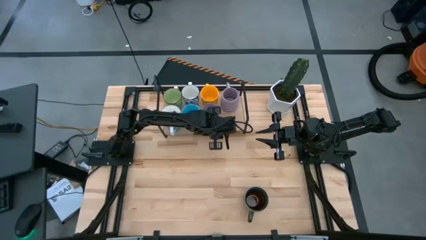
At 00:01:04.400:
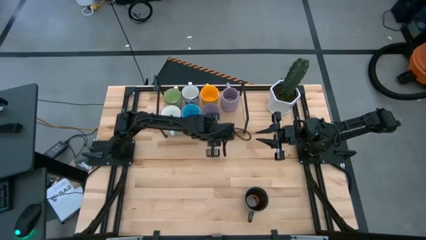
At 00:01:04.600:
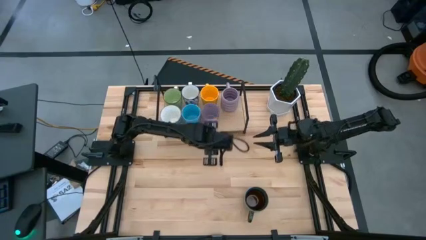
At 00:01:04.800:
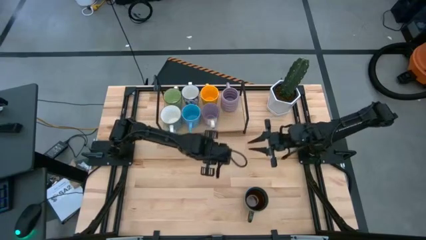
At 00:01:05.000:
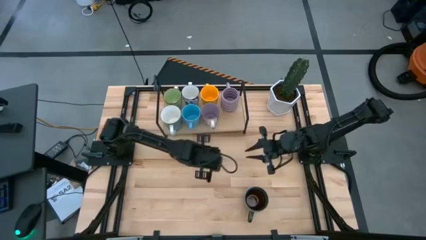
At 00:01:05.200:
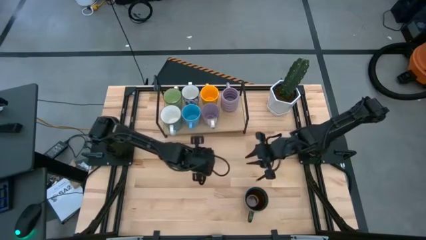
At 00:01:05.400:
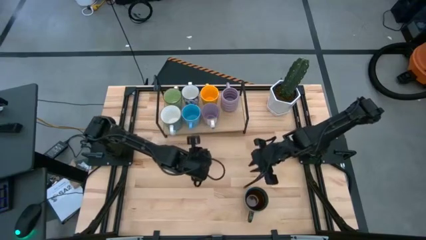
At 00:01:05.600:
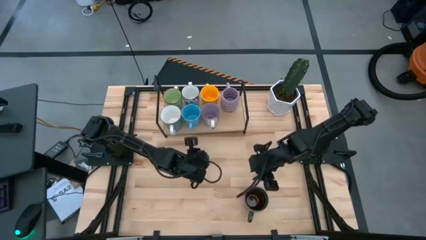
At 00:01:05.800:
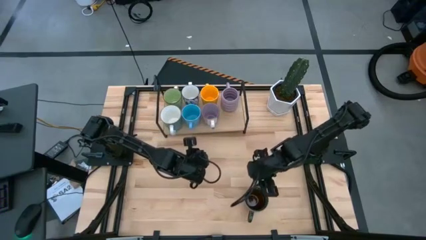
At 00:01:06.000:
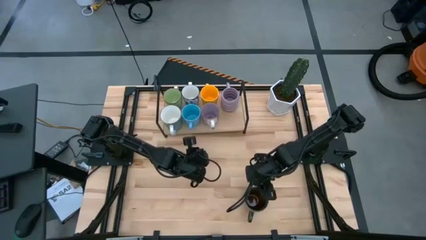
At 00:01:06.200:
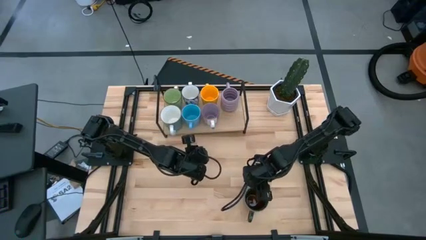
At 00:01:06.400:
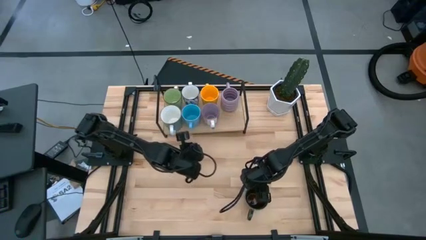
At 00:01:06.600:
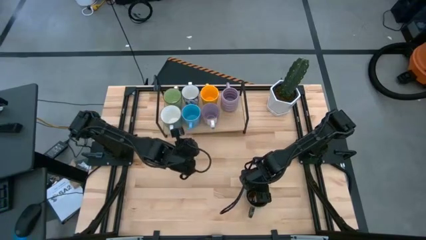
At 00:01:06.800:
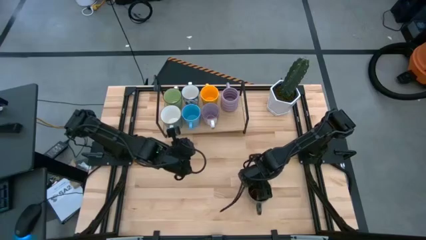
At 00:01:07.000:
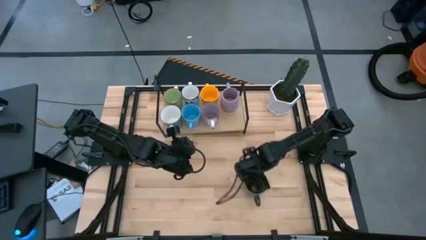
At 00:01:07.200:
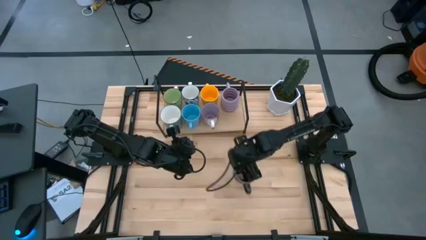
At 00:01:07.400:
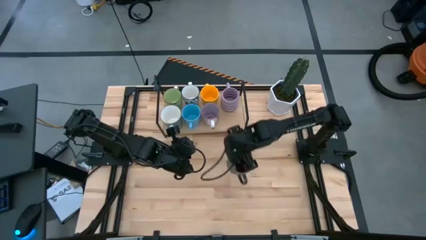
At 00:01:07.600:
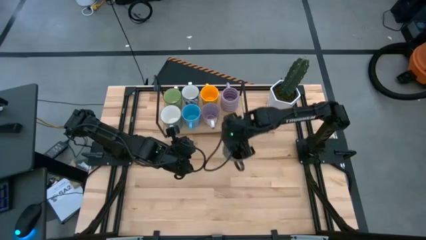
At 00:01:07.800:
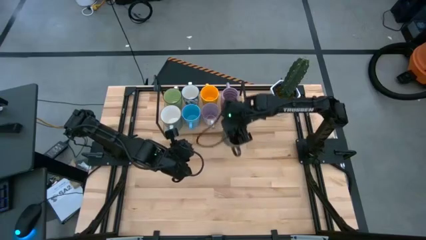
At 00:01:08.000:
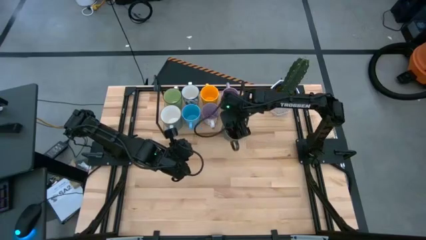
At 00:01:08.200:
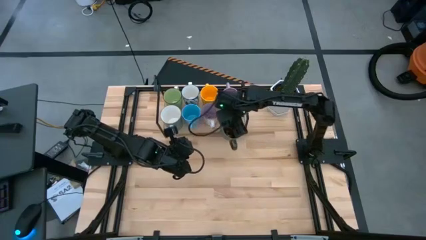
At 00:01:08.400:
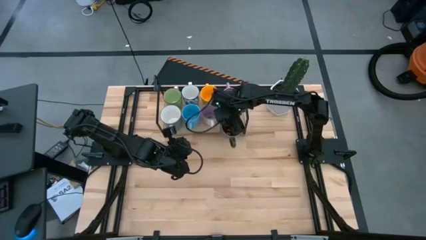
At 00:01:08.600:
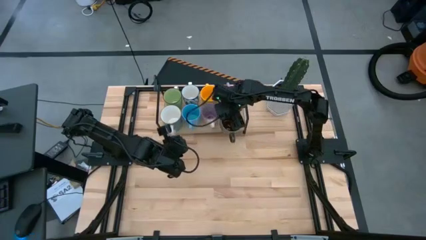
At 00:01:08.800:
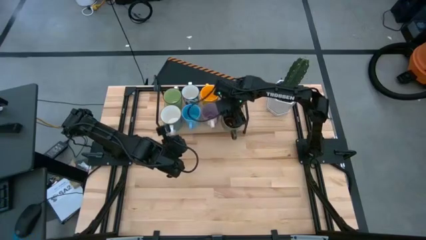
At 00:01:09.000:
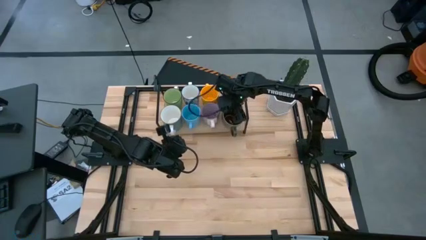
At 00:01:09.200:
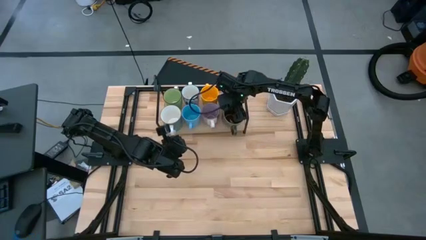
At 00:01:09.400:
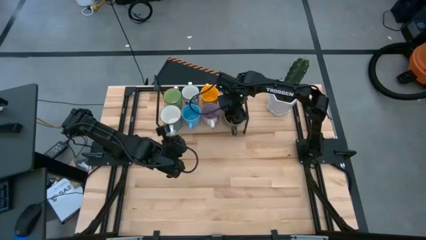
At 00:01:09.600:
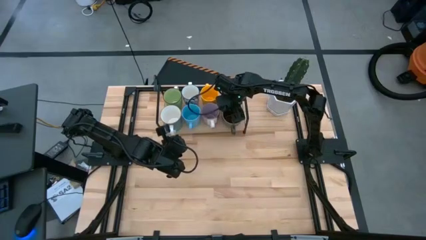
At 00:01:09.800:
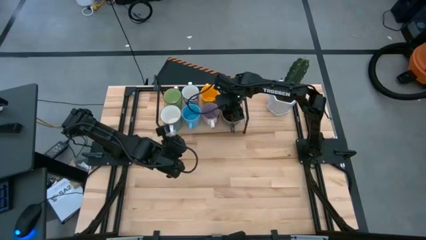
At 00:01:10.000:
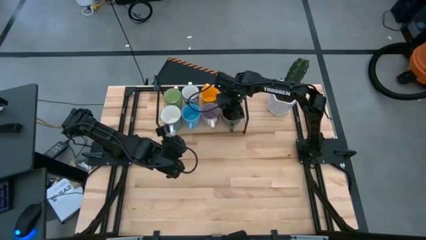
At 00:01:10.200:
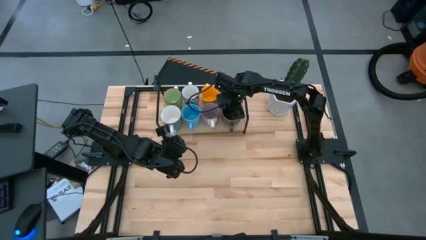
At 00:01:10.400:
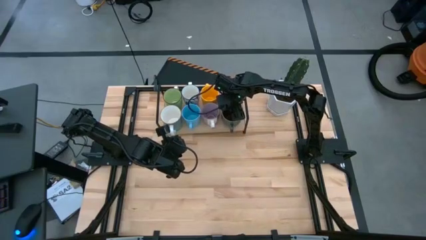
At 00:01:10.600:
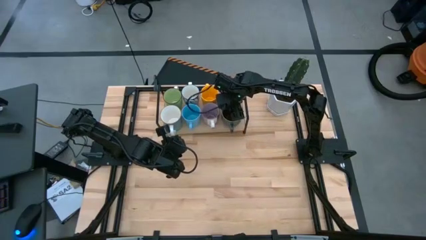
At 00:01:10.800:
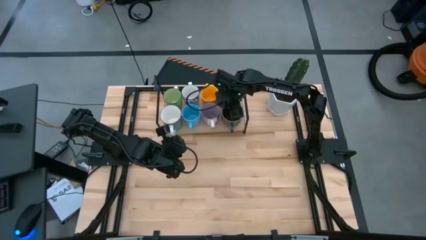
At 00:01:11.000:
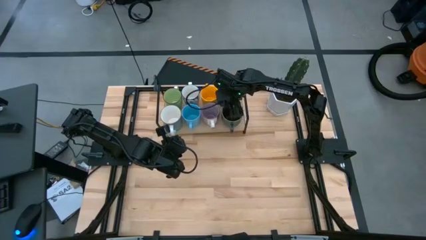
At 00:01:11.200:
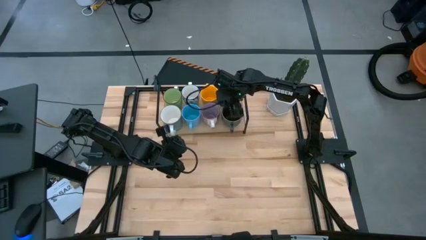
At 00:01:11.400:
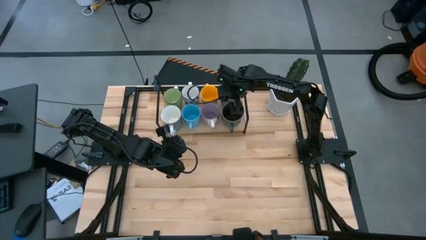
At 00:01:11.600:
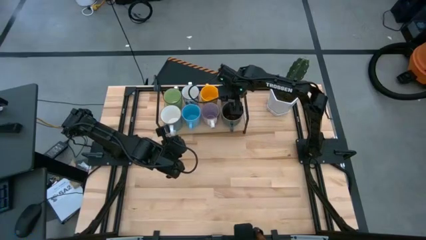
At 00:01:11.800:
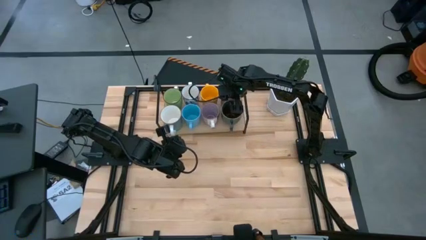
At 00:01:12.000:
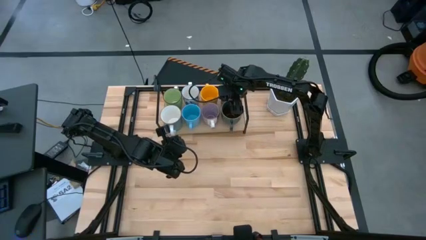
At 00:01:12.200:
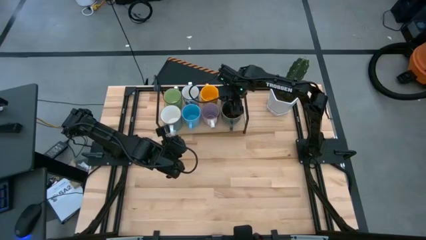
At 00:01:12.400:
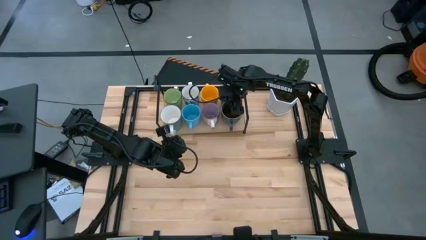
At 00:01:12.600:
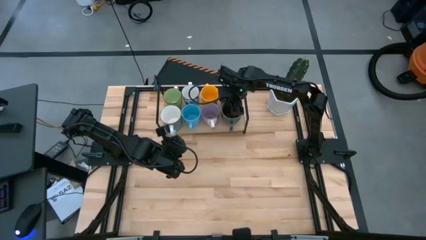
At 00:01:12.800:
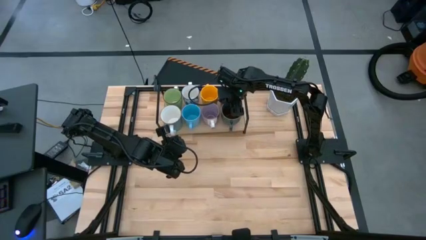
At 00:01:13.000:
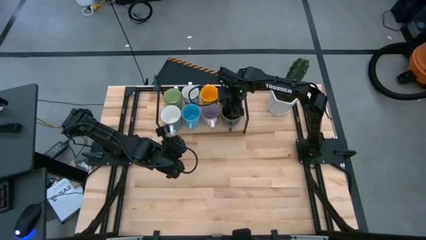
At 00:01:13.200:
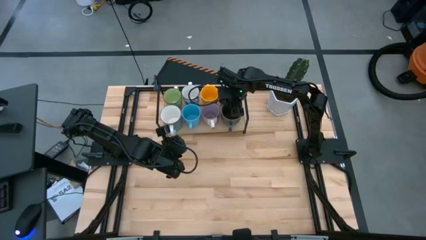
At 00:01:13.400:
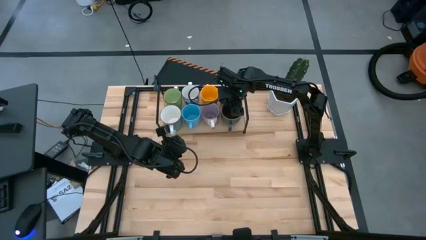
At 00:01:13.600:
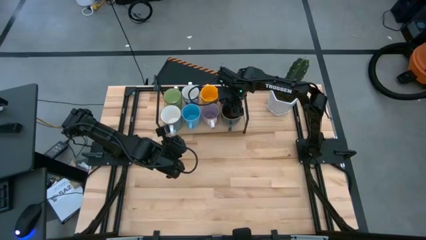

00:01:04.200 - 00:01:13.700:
Task: Place coffee mugs
Put the brown patterned mug on the shelf

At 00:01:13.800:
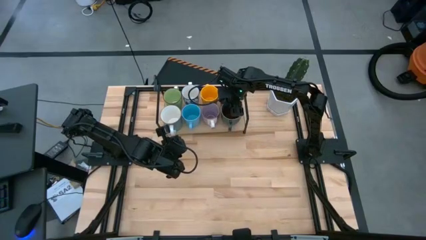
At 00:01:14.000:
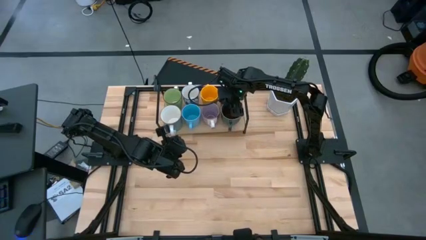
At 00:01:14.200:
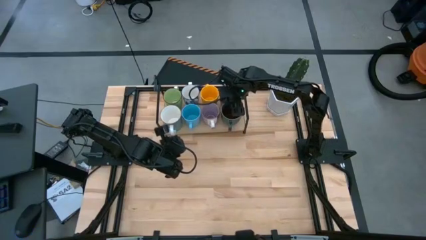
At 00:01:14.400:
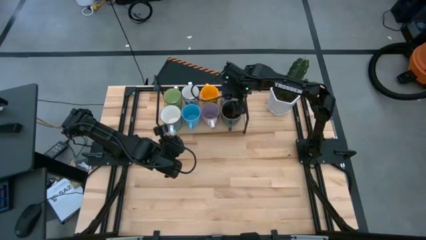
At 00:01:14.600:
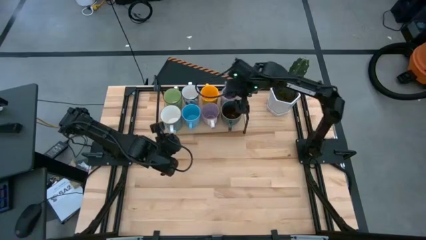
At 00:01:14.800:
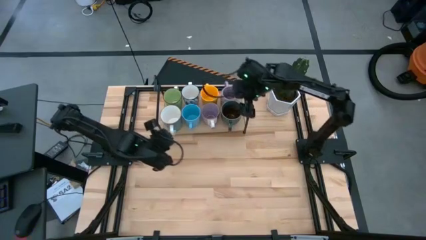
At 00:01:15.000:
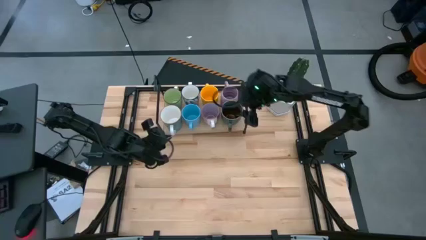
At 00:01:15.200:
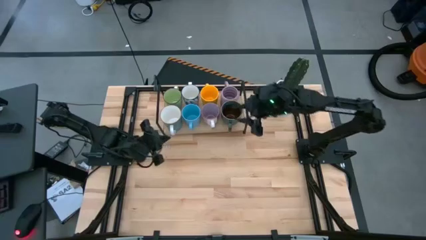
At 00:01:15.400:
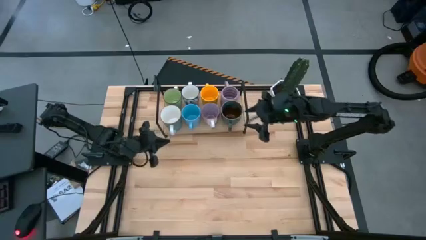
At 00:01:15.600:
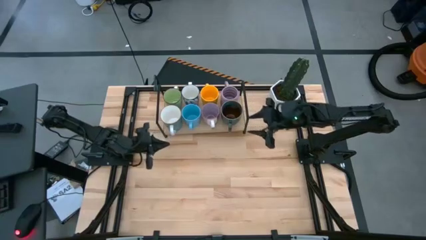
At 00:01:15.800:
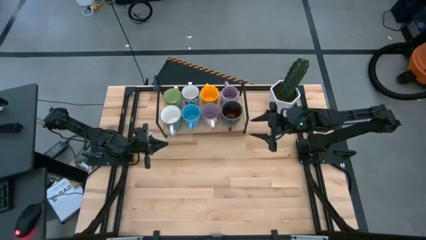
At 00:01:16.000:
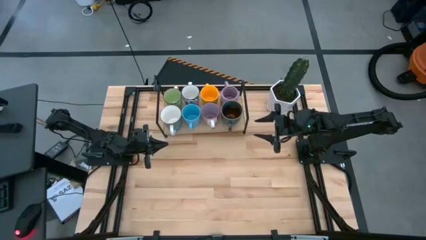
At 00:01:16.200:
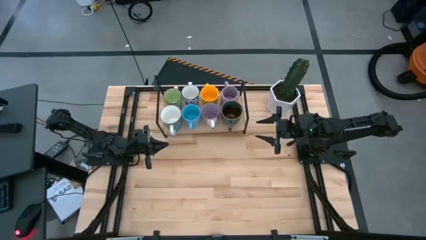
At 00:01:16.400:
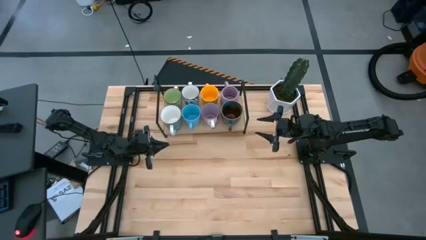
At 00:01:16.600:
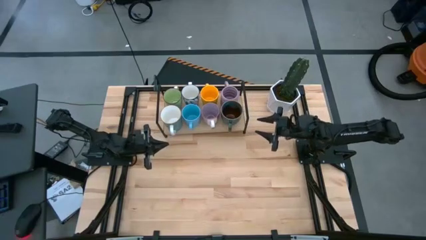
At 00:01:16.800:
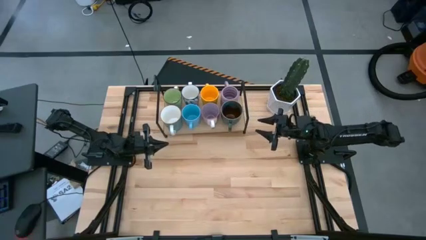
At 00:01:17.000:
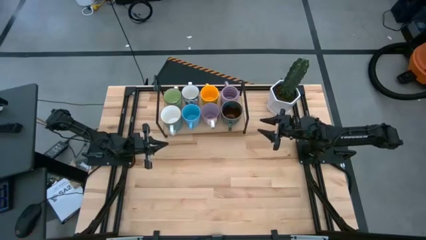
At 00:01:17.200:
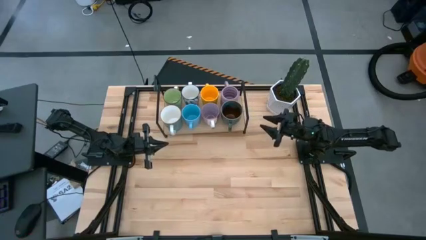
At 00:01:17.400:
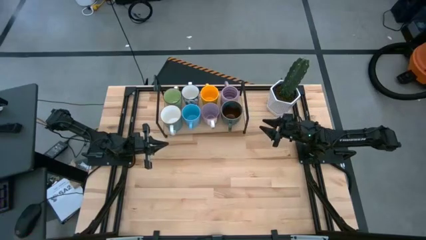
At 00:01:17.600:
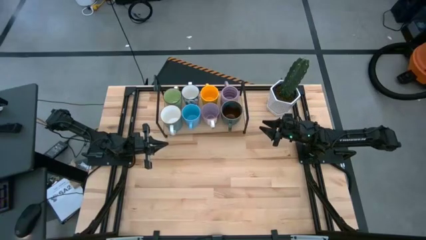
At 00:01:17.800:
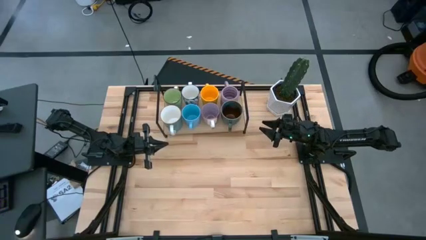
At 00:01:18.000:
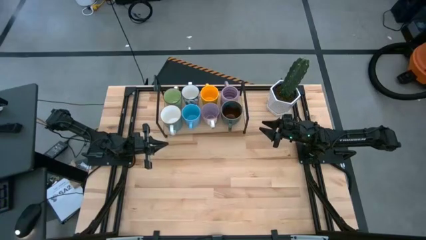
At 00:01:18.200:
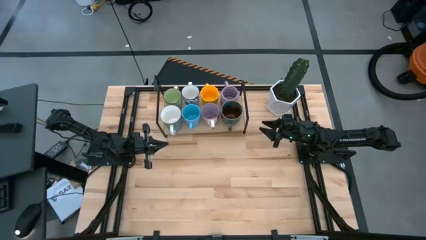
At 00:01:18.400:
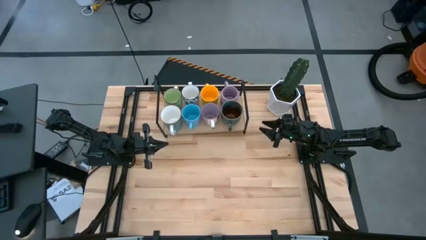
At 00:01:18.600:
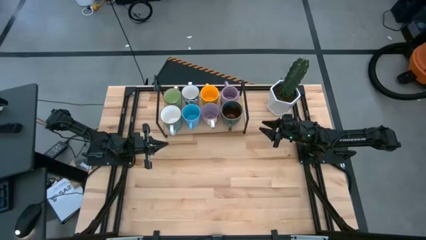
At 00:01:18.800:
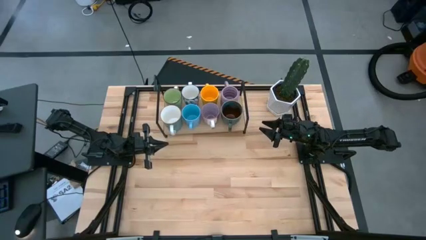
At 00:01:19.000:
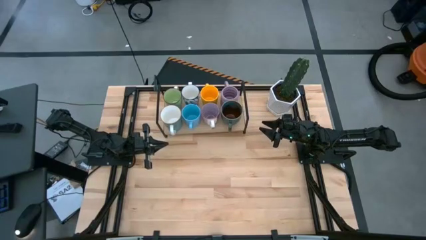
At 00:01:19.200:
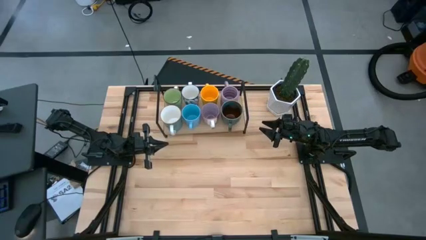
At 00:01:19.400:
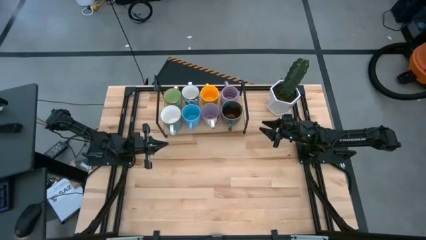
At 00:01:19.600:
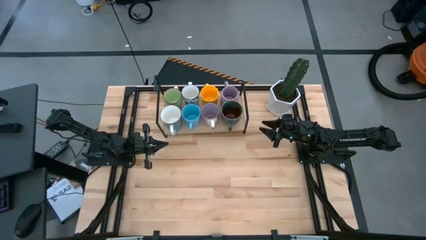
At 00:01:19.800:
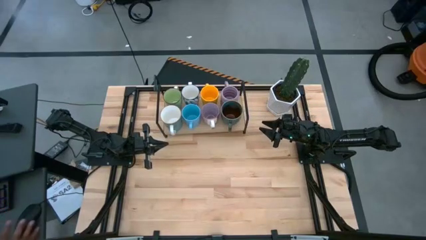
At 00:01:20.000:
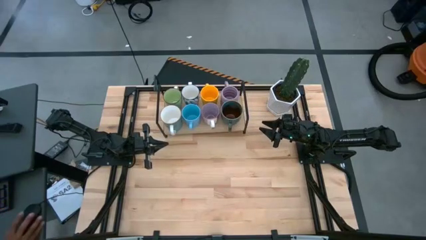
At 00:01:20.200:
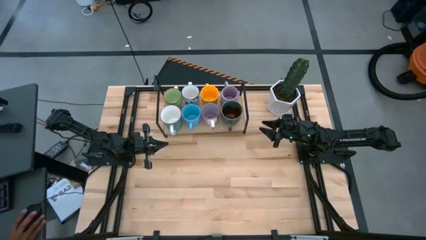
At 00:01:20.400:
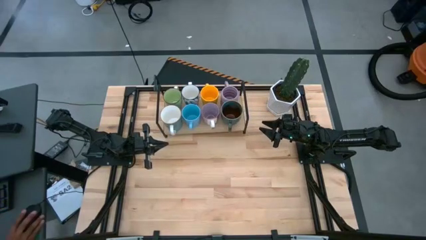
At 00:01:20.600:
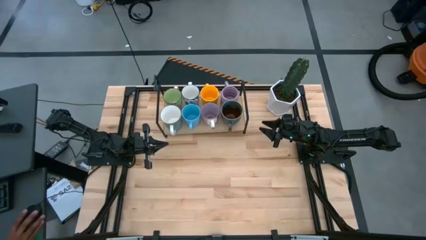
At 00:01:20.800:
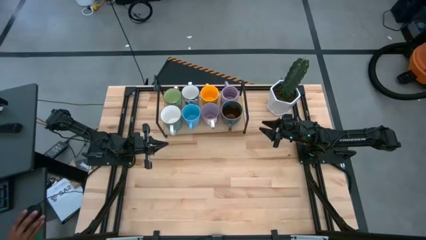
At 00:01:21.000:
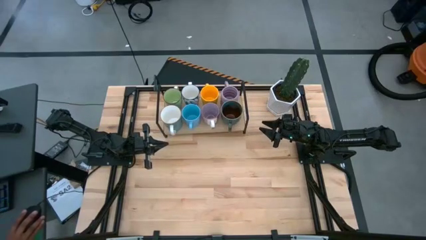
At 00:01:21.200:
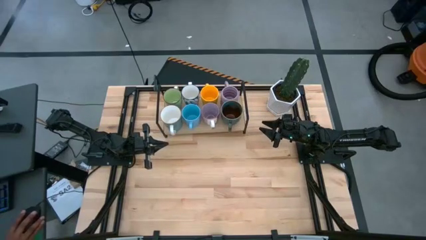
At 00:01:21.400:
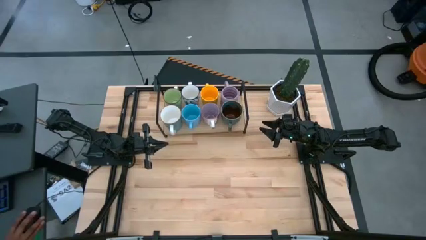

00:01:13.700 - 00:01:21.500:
Return to Home Position
